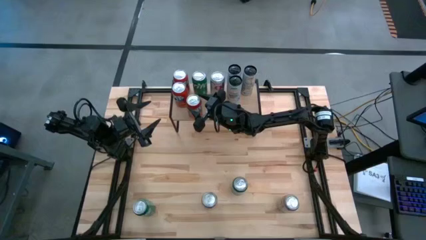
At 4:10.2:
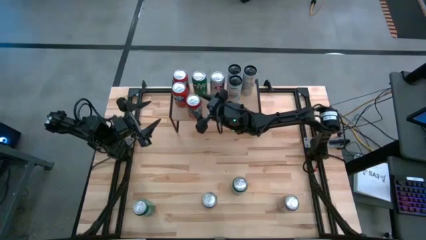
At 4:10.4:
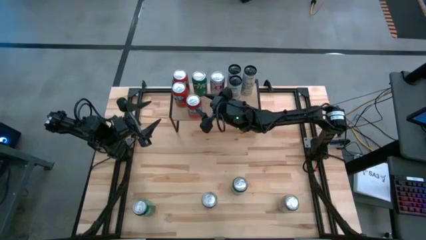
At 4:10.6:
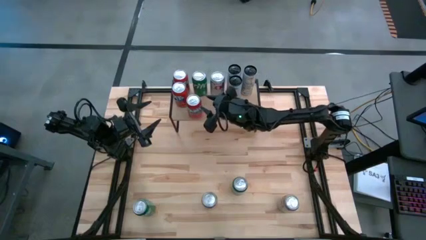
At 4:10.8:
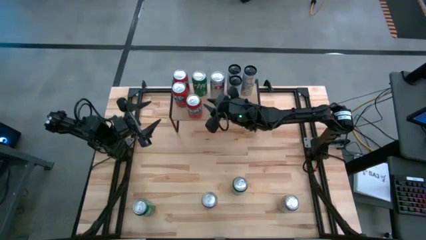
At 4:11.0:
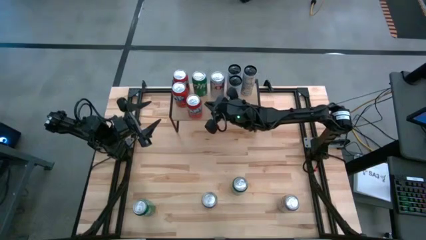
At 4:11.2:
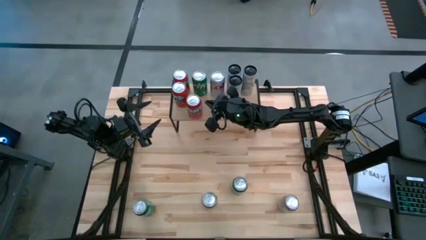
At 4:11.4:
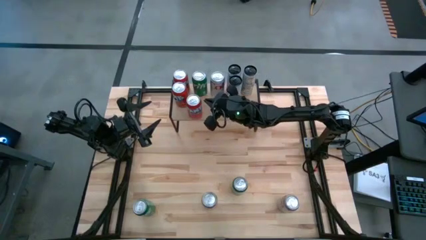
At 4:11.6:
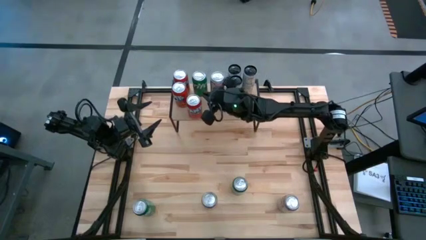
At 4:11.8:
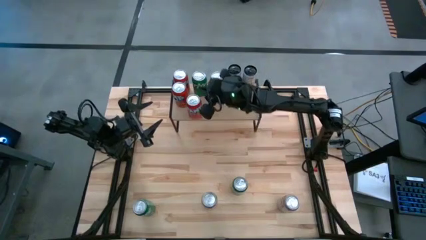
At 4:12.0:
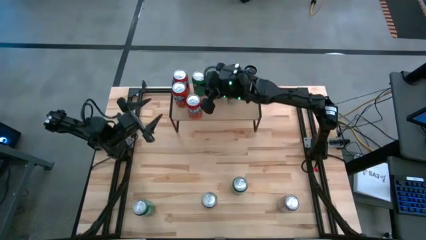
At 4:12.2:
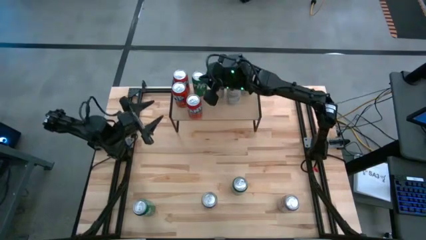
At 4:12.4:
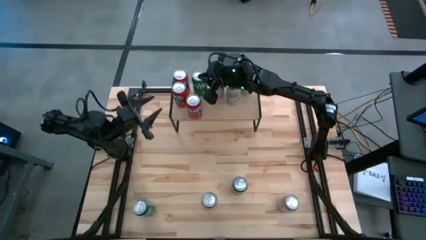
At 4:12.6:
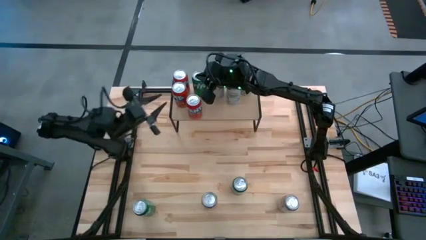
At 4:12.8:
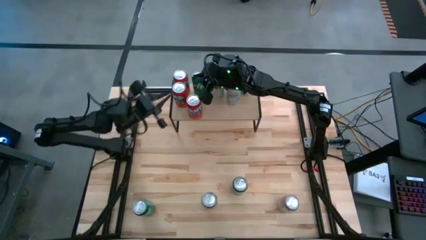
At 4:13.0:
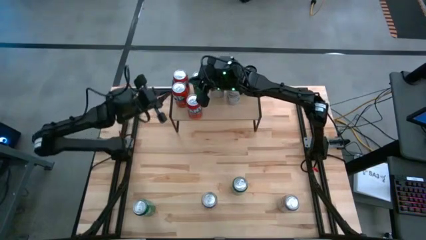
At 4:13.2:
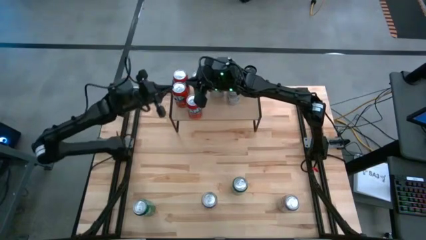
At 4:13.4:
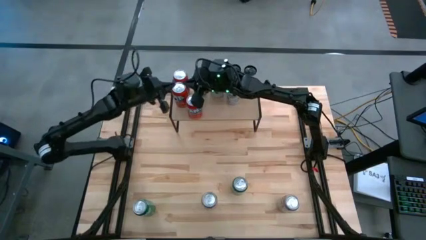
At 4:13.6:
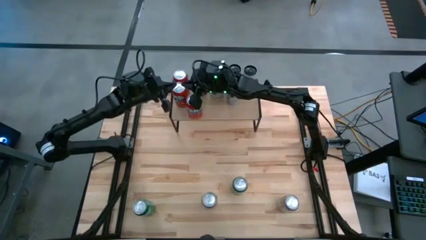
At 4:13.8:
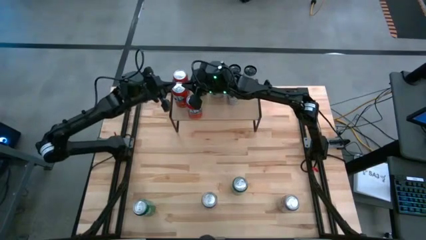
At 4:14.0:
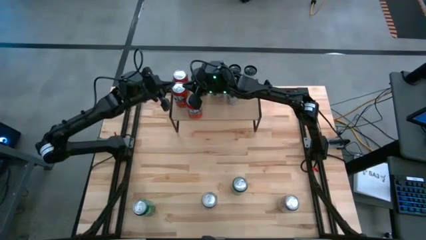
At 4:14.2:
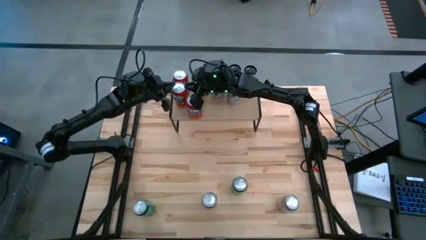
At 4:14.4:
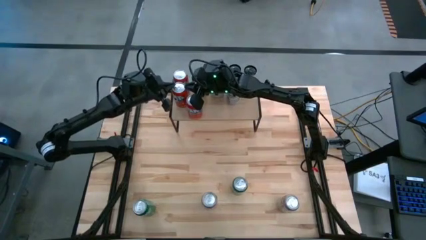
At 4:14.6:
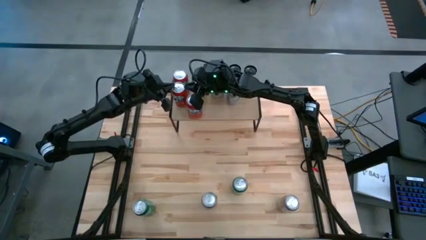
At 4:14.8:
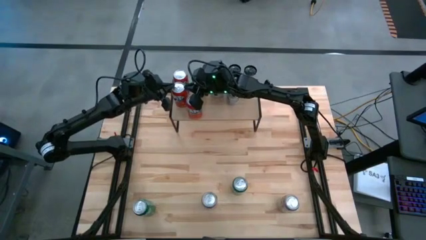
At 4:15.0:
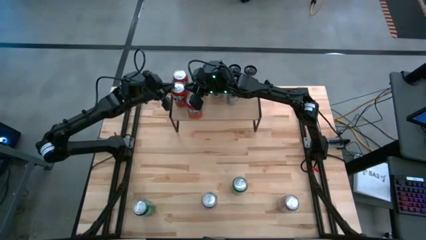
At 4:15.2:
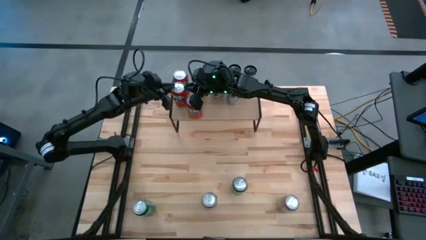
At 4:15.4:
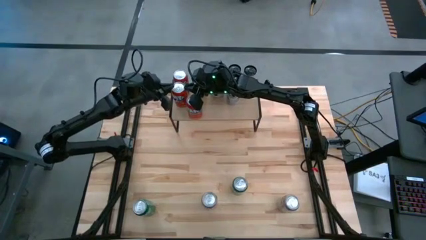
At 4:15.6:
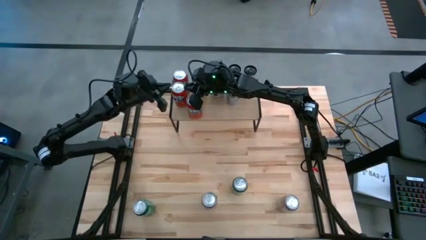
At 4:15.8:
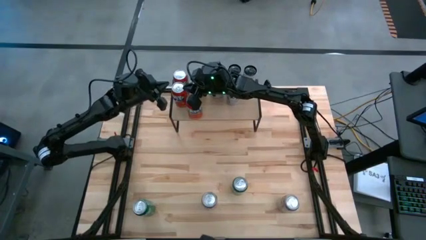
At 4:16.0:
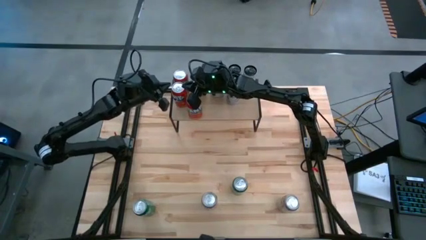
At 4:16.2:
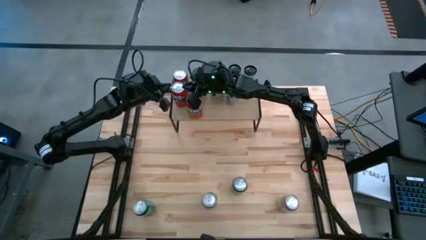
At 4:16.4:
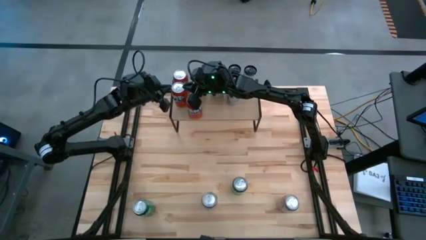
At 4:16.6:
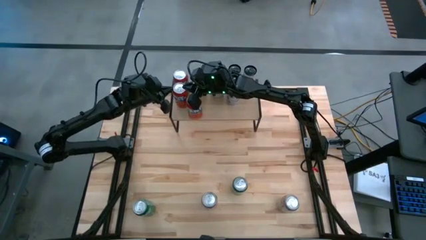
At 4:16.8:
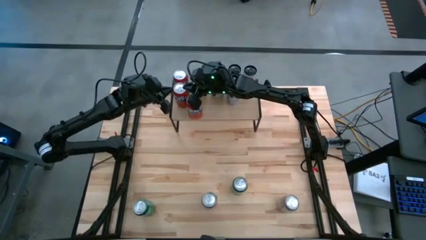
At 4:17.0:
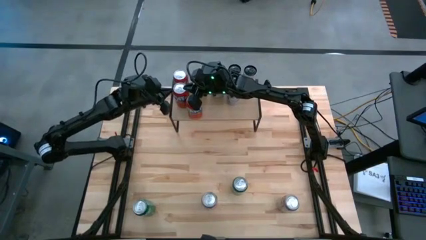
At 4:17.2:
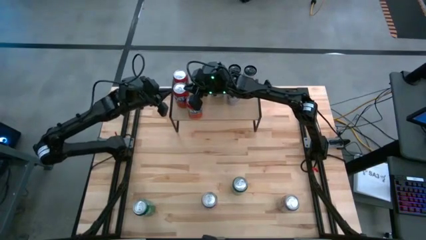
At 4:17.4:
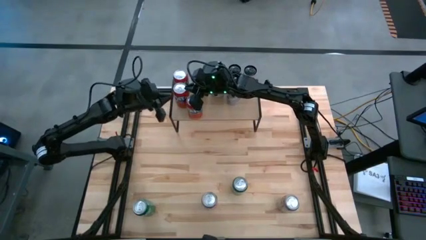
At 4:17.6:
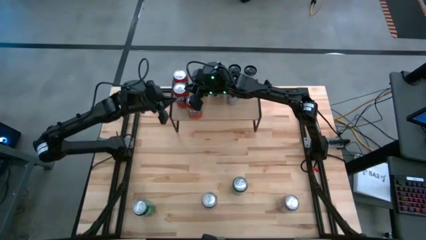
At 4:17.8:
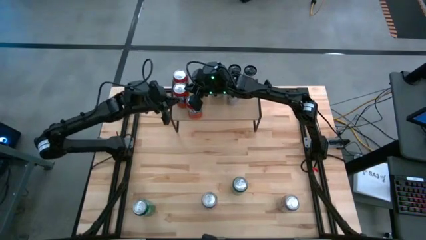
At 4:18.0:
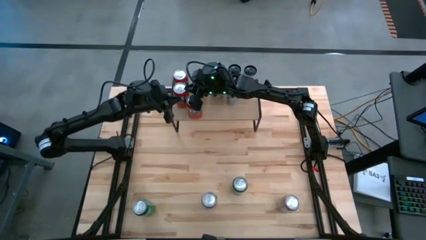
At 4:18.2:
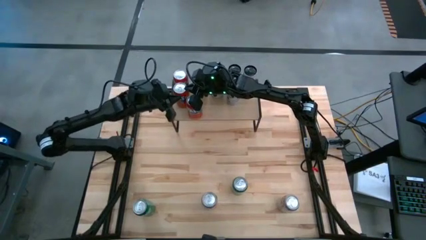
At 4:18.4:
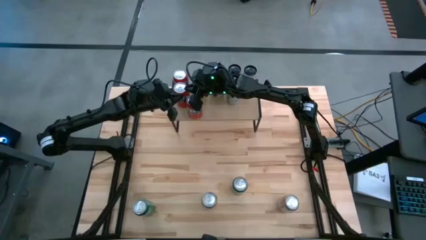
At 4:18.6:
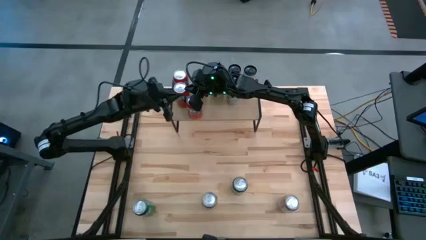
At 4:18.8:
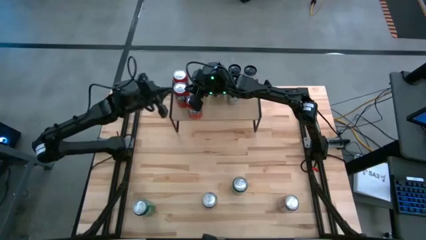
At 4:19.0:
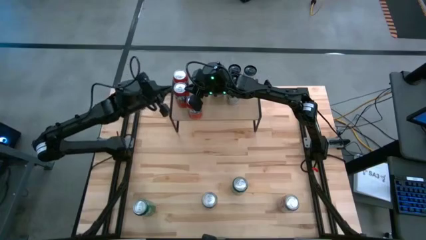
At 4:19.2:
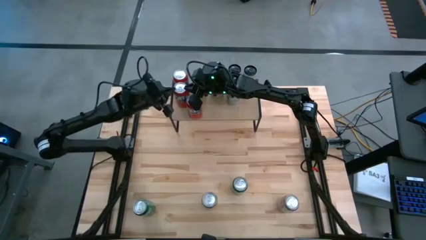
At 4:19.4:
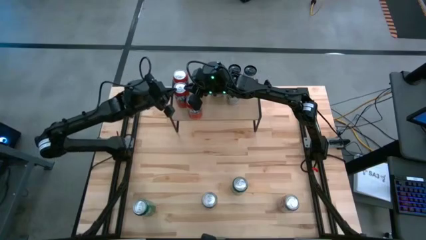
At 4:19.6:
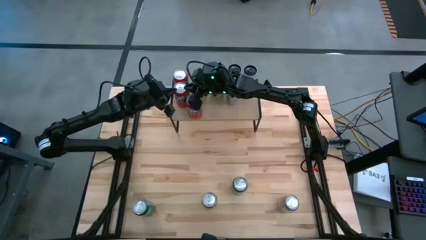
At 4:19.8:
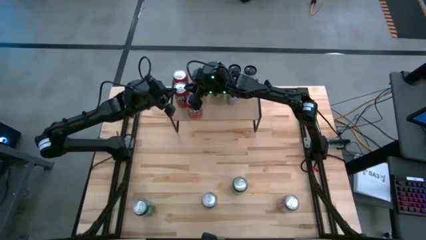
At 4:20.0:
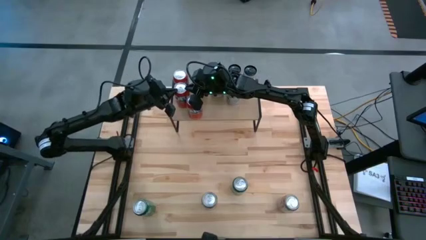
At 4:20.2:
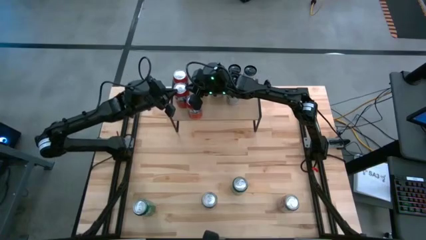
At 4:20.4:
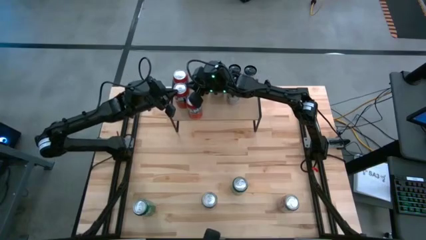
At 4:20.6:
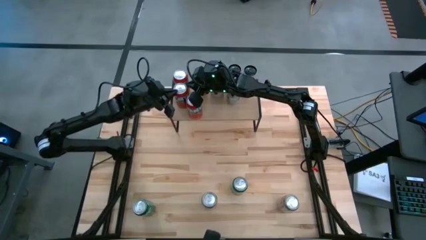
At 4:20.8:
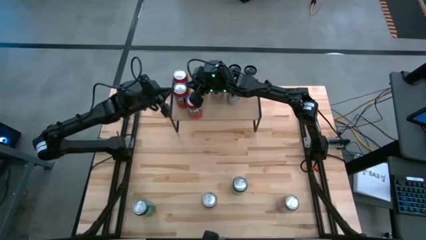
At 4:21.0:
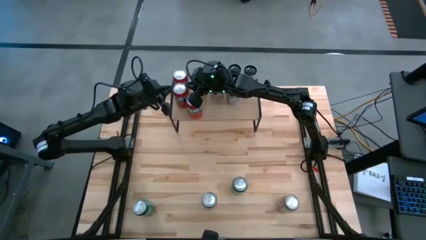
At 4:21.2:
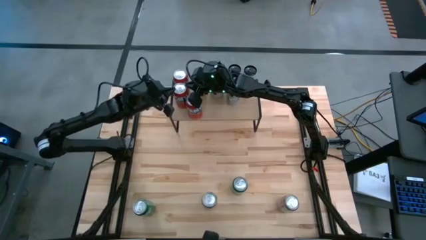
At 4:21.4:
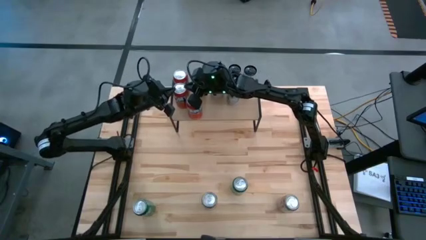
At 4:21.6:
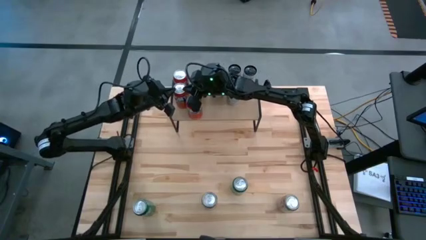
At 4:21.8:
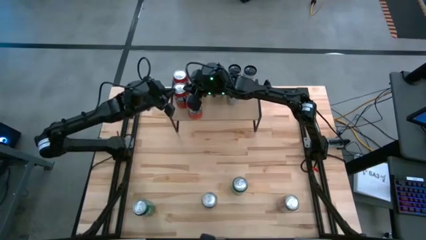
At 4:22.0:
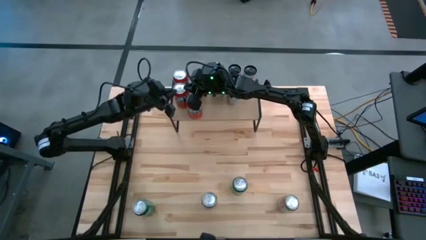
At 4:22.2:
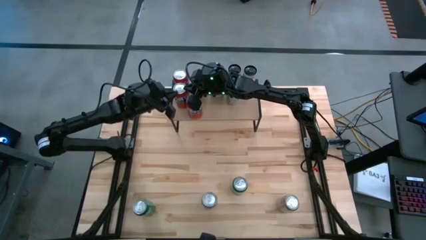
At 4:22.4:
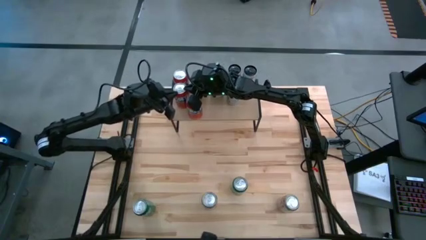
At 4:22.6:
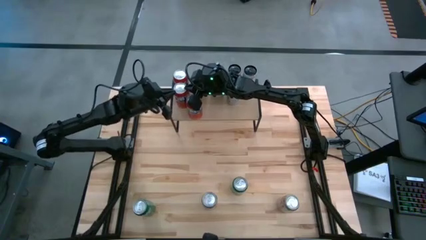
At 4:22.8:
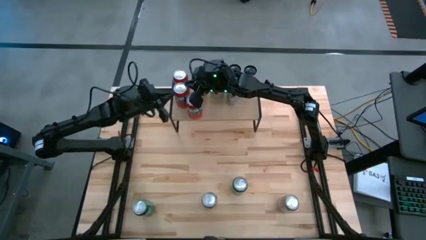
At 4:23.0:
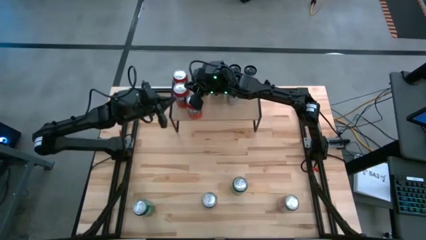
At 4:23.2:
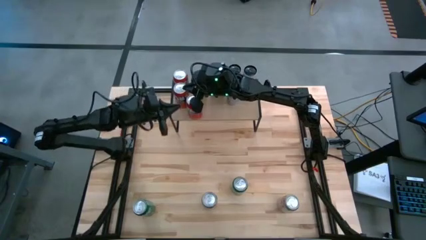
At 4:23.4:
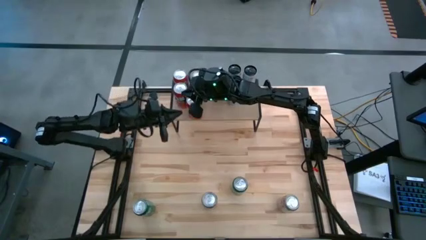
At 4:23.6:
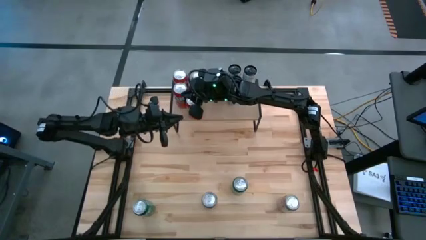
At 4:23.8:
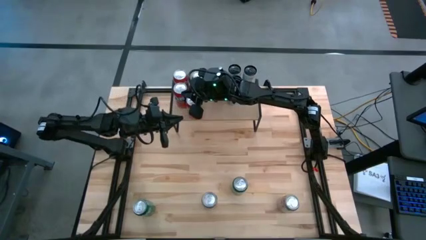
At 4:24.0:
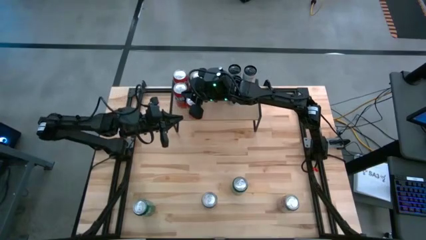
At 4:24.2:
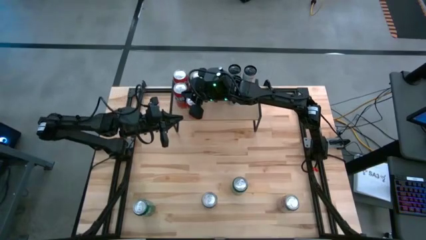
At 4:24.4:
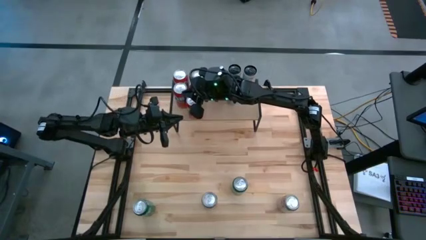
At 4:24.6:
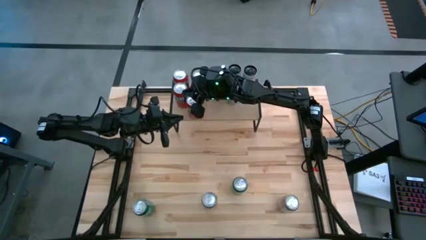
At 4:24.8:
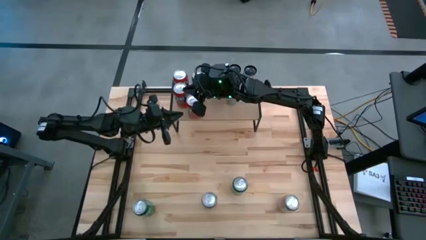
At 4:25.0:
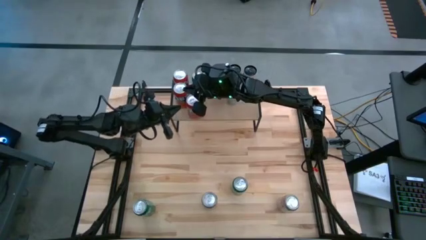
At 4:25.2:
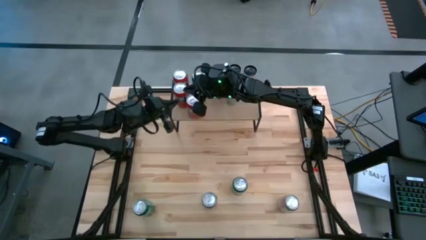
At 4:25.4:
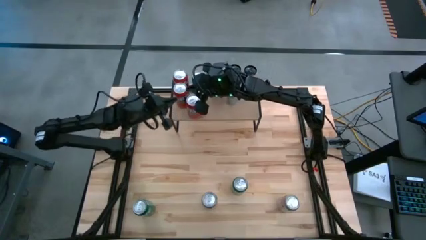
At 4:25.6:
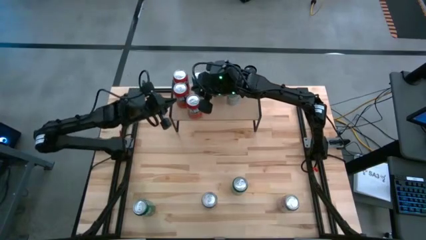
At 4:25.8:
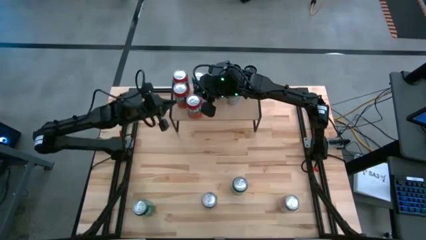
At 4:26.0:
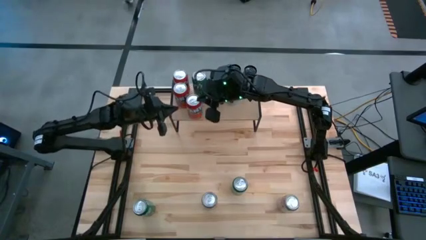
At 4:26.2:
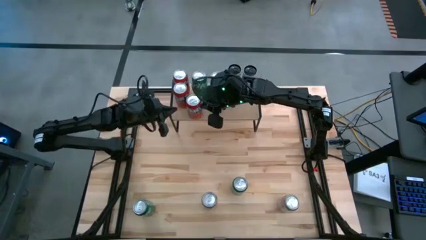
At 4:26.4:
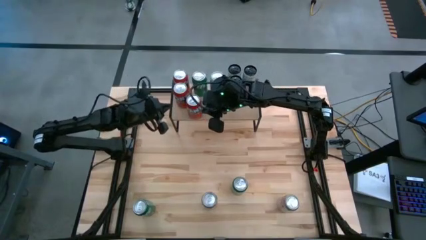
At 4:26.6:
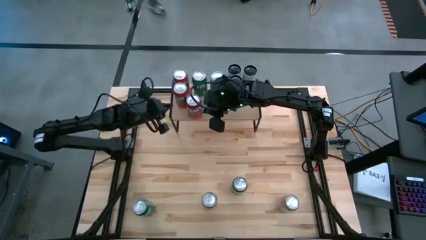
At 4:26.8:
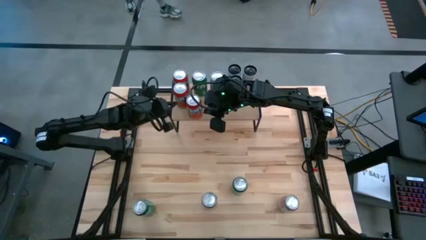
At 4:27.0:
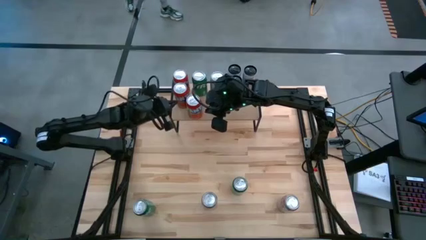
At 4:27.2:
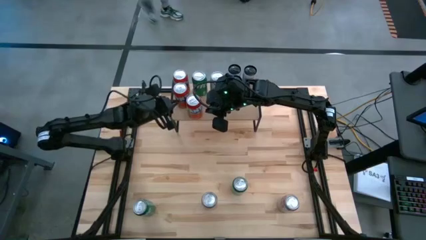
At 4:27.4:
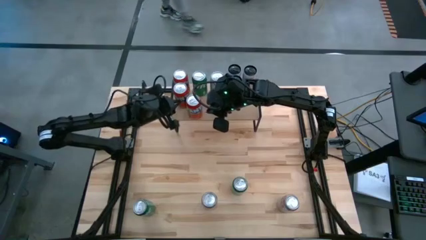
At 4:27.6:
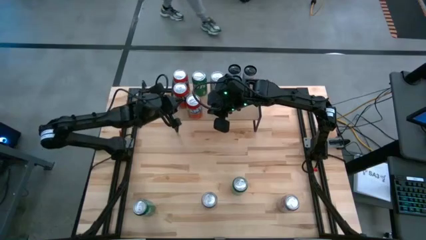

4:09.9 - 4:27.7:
Task: Place canned beverage on shelf
Adjust the orange soda cans
